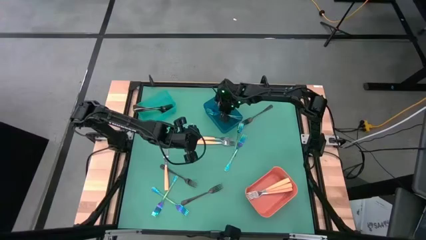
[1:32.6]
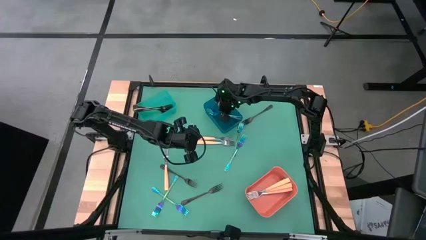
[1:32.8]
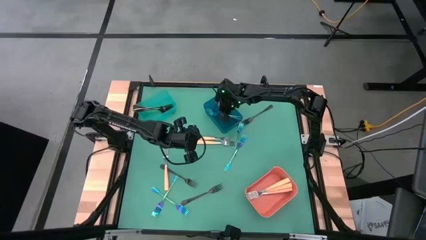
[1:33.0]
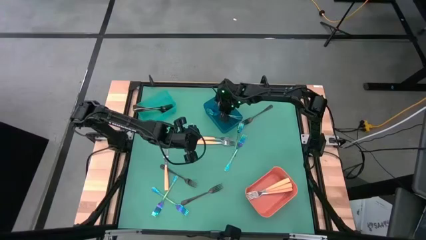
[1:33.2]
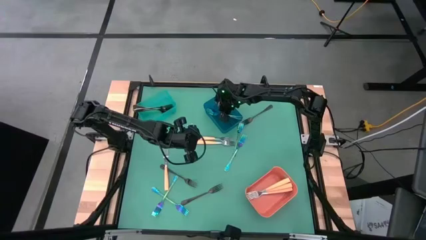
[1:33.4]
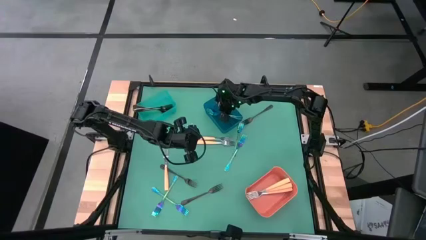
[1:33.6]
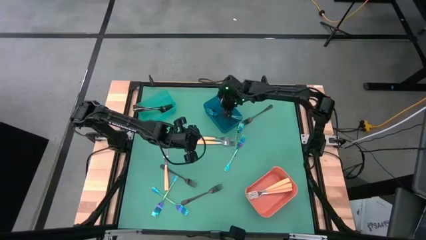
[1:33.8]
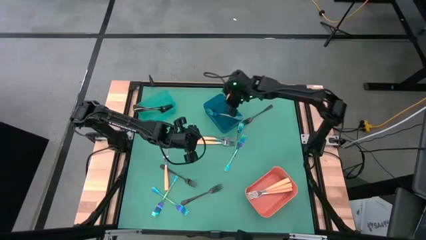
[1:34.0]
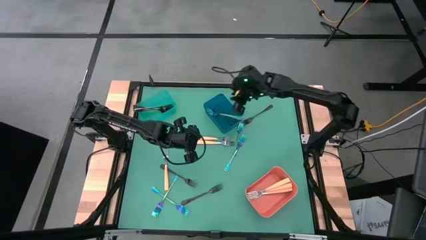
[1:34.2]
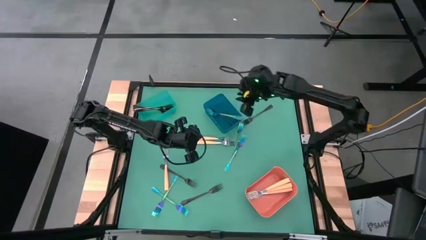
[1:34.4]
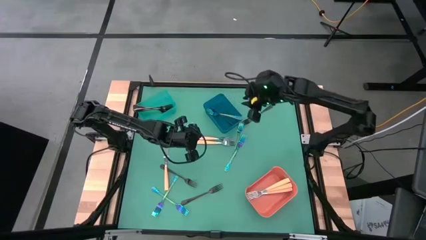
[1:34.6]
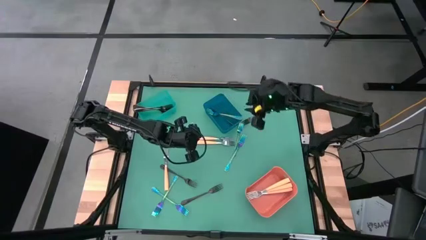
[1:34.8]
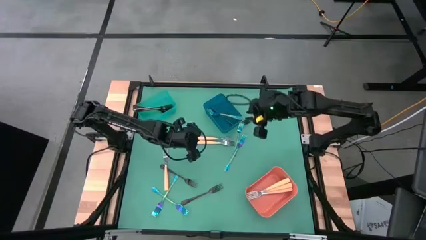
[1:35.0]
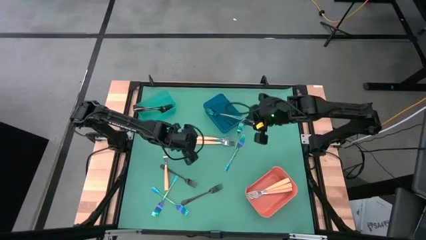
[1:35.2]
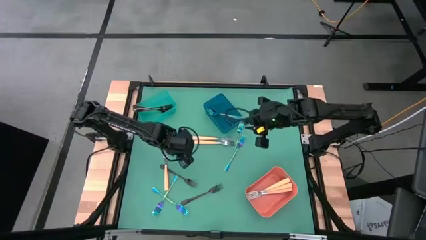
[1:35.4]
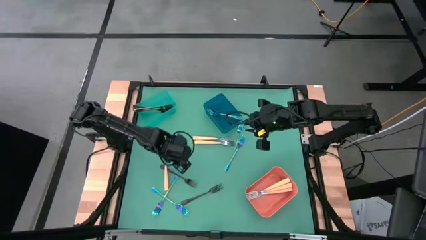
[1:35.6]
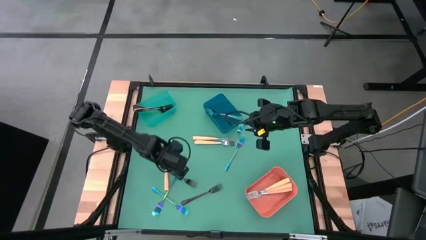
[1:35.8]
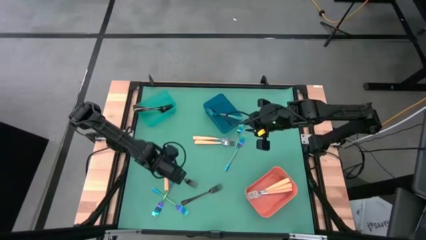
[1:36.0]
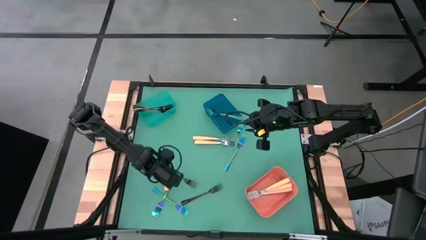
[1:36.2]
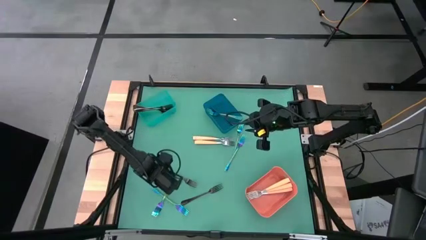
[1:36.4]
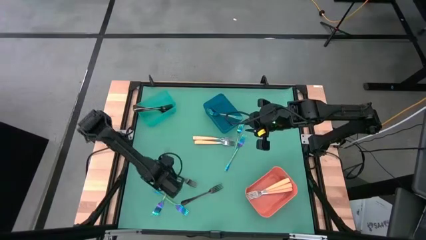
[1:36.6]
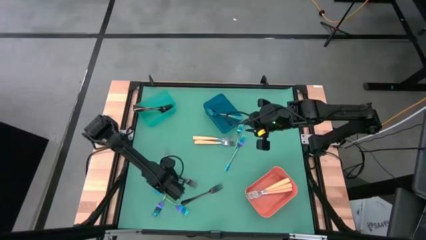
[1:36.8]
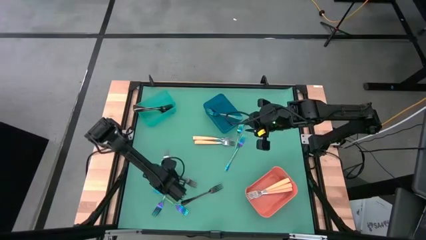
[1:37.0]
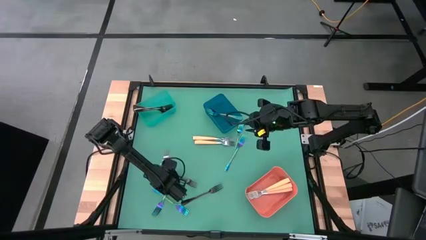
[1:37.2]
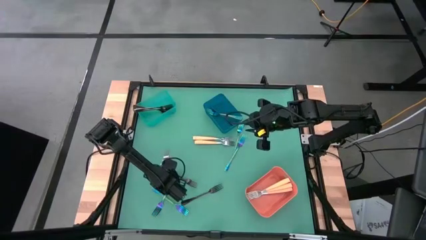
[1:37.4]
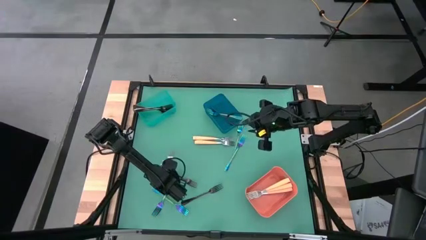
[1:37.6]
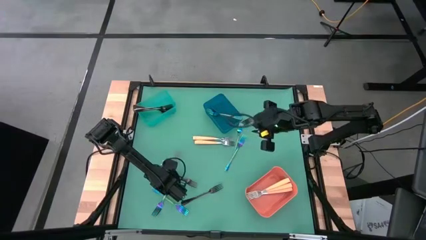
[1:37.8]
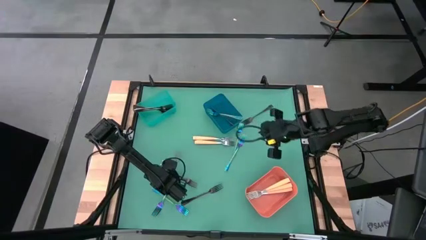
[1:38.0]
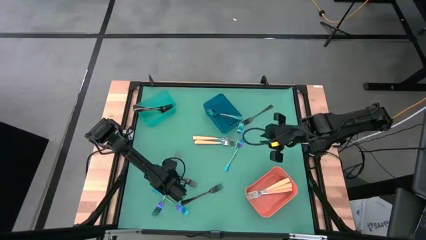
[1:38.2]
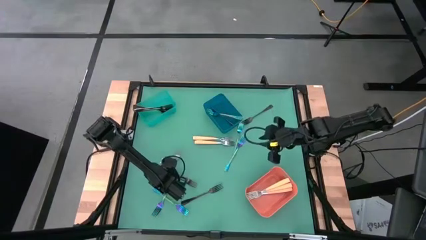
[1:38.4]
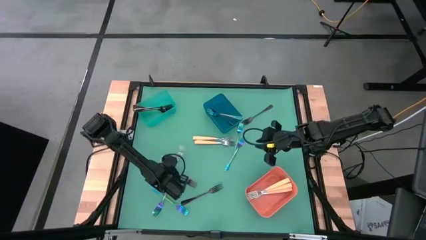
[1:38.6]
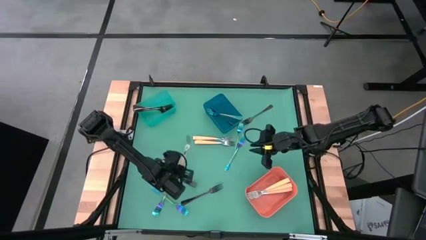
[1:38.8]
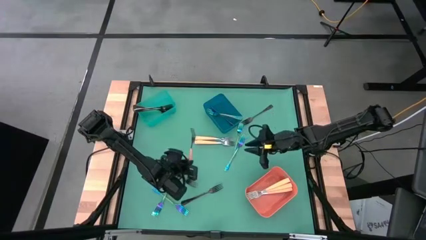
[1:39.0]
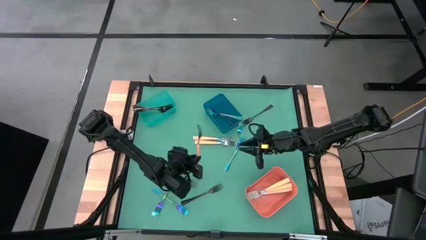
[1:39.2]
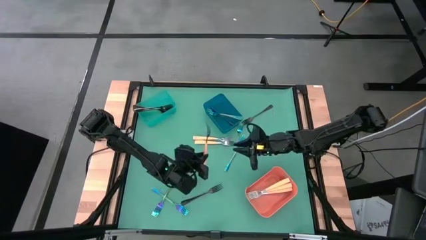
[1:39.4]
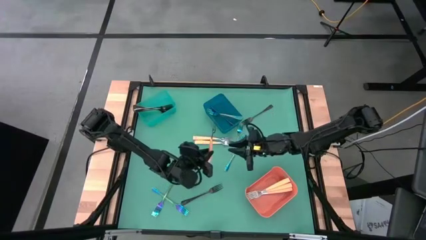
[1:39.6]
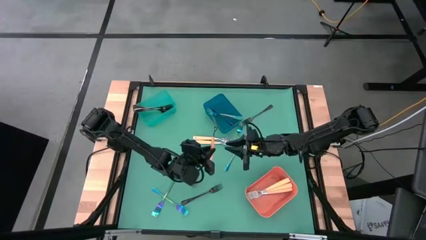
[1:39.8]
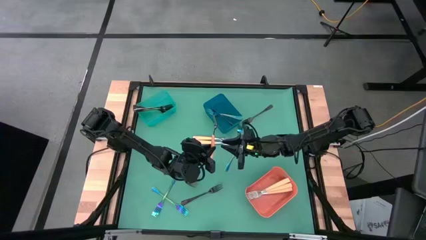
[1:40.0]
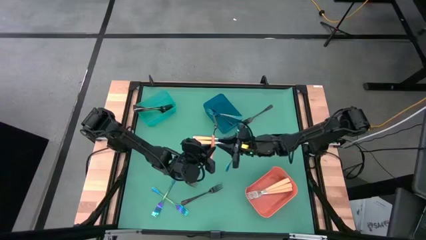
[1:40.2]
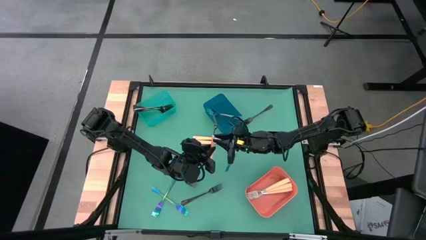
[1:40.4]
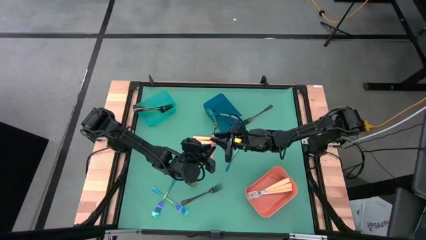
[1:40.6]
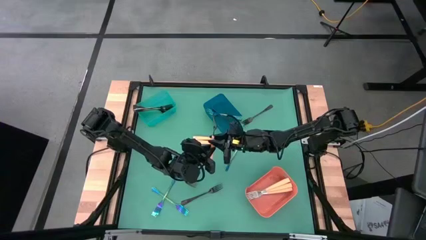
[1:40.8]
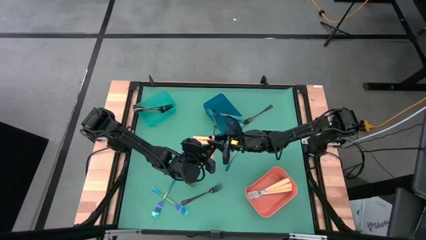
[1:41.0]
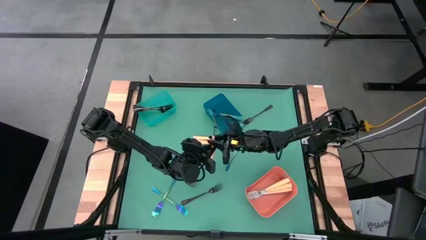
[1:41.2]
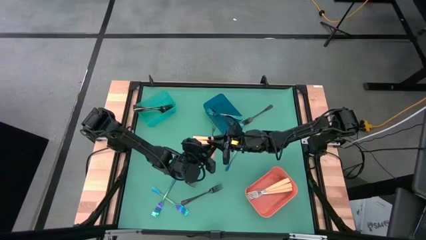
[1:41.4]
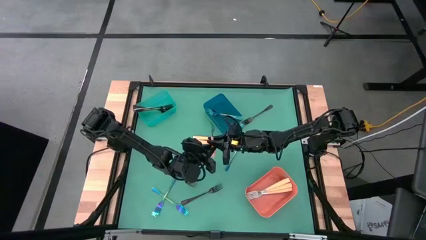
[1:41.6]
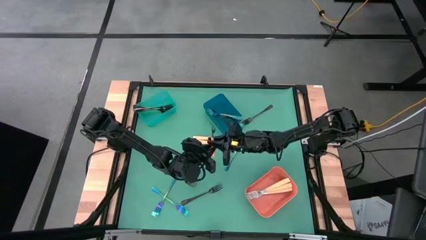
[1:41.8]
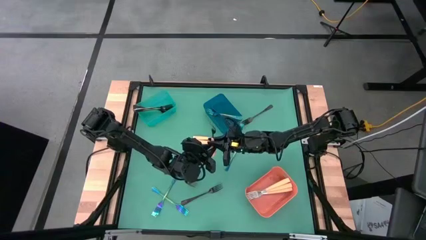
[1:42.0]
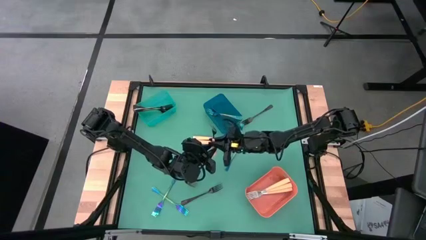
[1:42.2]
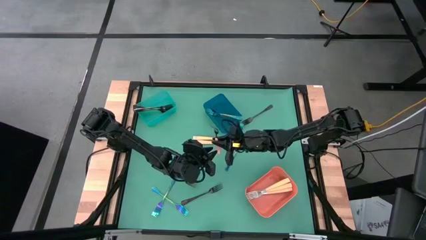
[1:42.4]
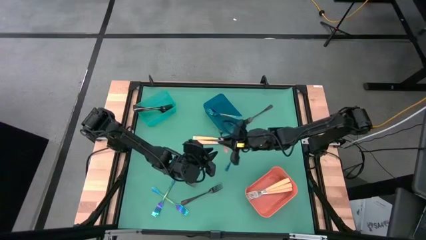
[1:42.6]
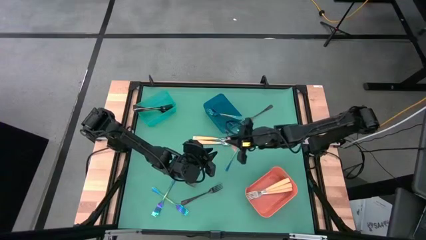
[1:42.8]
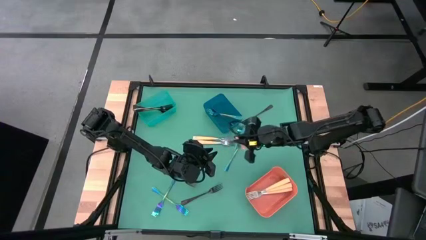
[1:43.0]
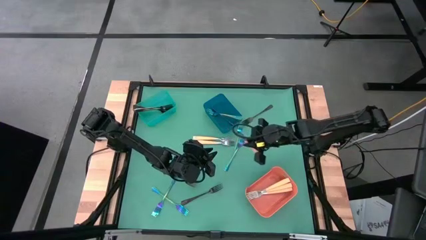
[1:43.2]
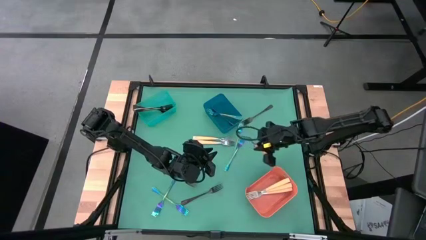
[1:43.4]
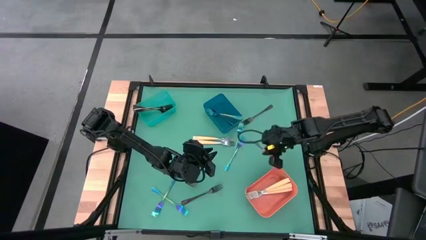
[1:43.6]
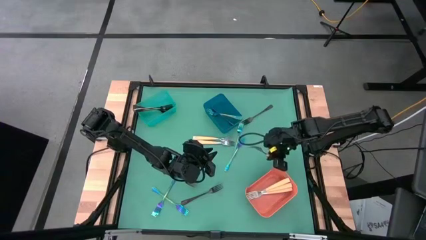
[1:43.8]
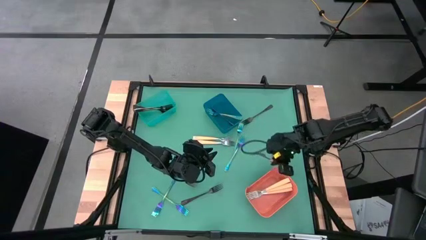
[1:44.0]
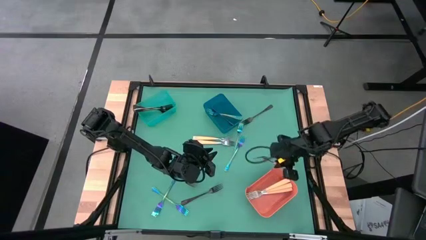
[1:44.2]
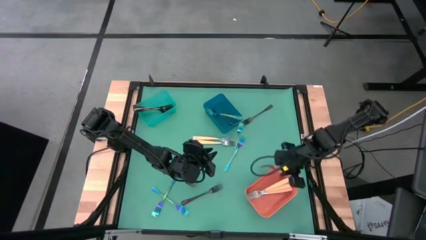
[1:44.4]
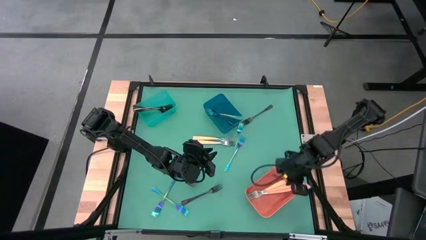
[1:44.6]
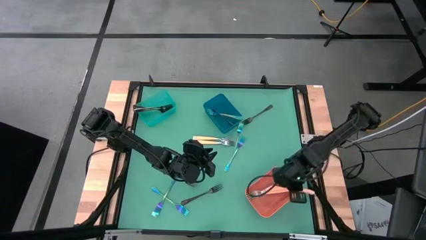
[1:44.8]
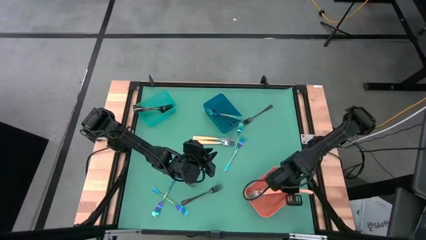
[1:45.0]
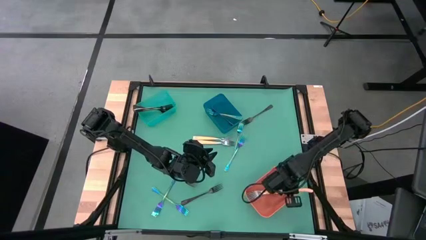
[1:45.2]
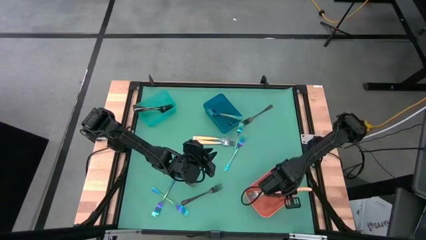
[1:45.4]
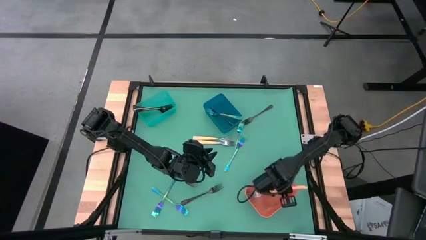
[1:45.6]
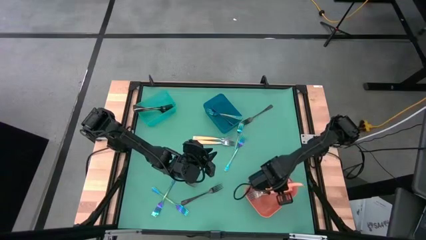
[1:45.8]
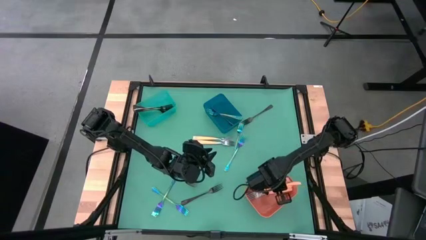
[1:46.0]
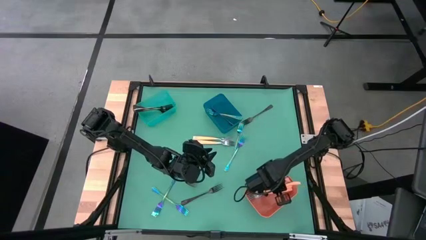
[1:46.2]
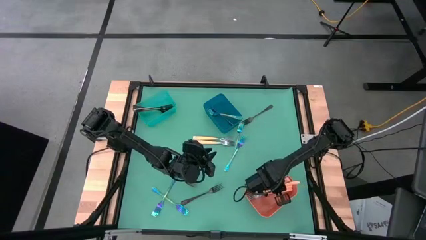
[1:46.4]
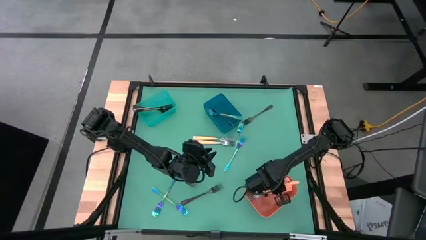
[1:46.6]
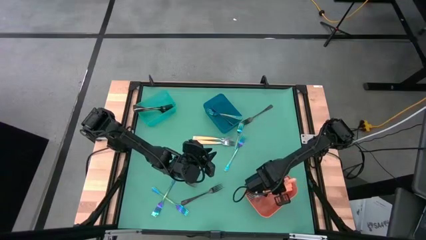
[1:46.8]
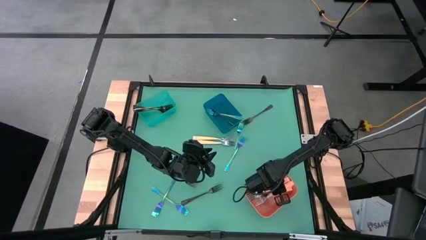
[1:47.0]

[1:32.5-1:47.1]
Task: Sort silverware by color (type)
Put the orange fork into the orange bin

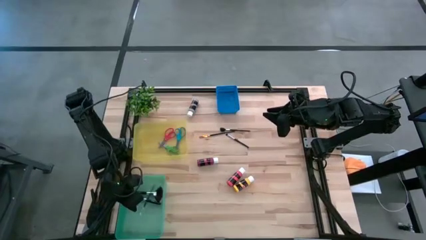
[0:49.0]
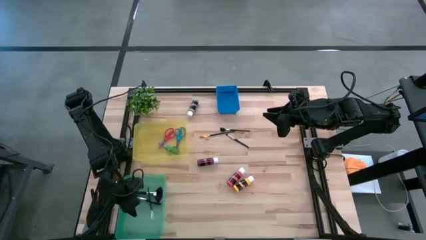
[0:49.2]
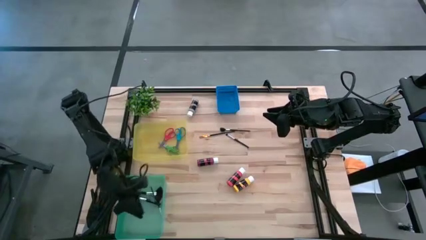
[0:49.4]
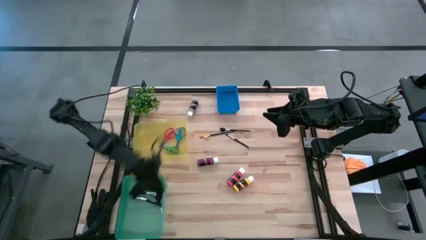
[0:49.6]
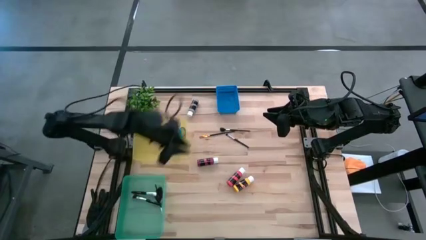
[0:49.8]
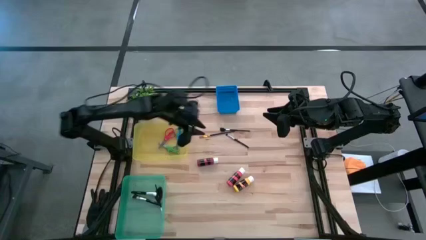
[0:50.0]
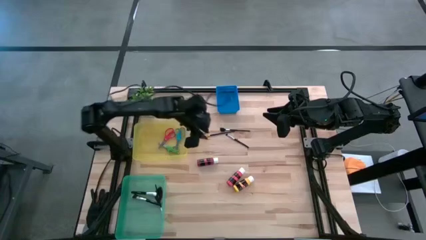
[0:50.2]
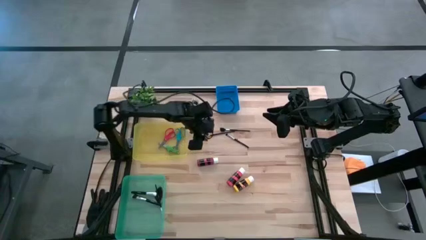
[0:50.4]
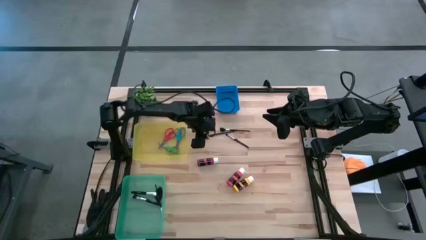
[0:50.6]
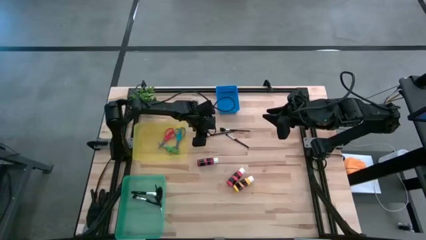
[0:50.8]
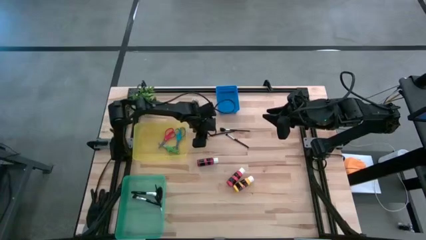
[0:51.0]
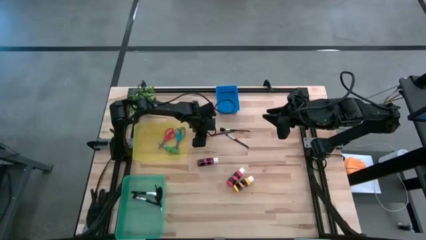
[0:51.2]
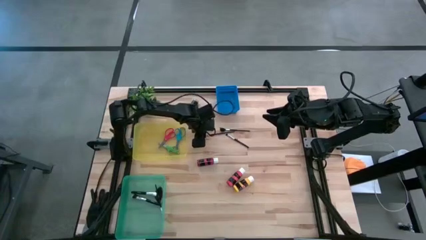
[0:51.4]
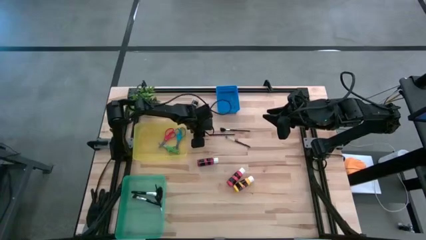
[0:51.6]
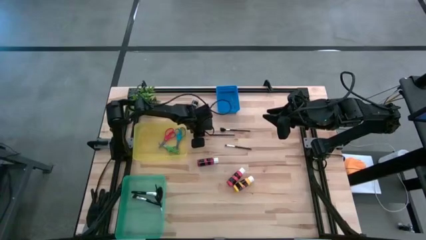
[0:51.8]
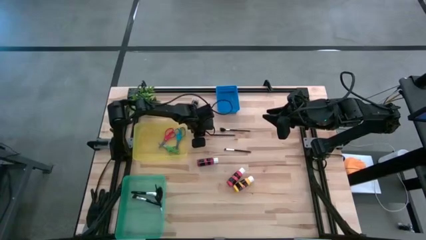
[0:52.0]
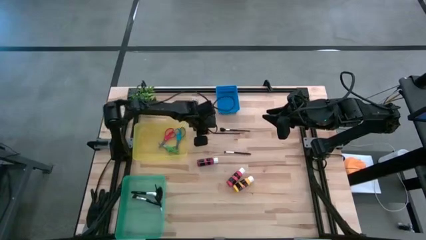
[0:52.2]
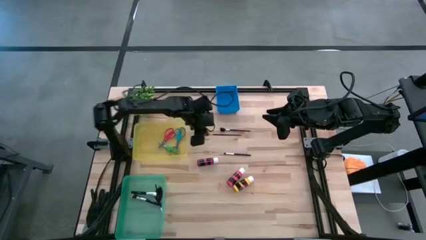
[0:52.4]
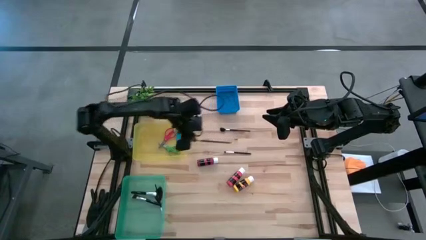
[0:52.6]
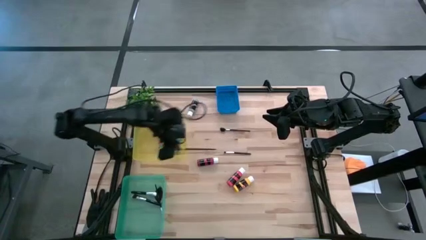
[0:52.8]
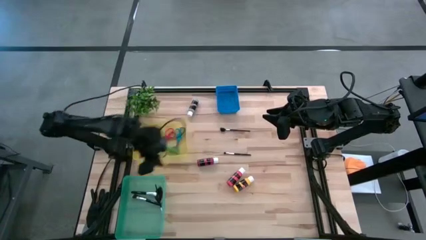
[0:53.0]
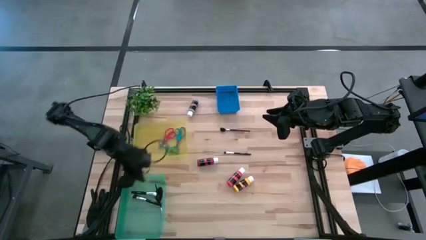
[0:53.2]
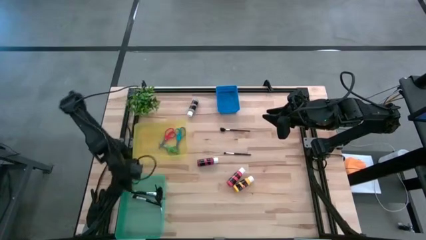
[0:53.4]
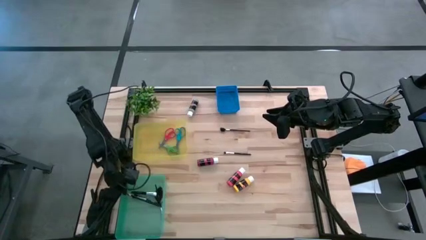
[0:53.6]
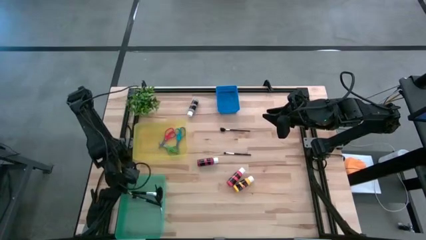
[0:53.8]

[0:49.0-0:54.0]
Task: Pick & Place Paint Supplies
Put the yellow paint brush into the blue bin
